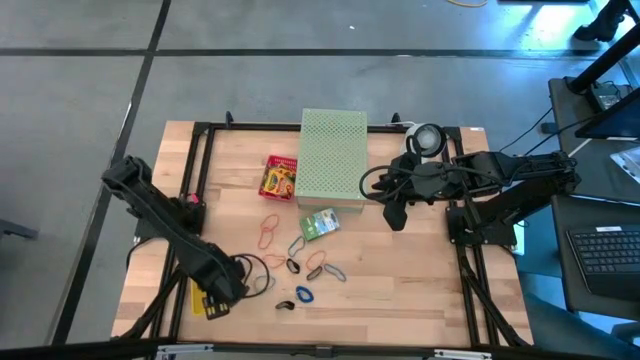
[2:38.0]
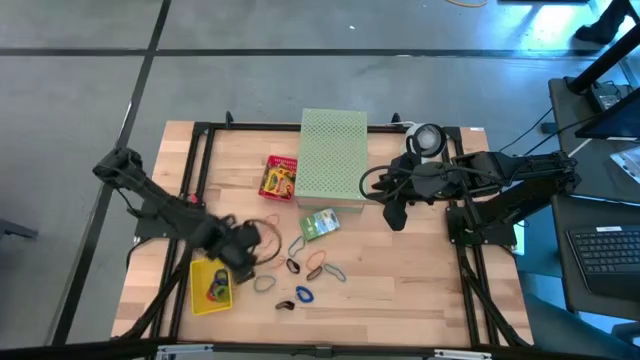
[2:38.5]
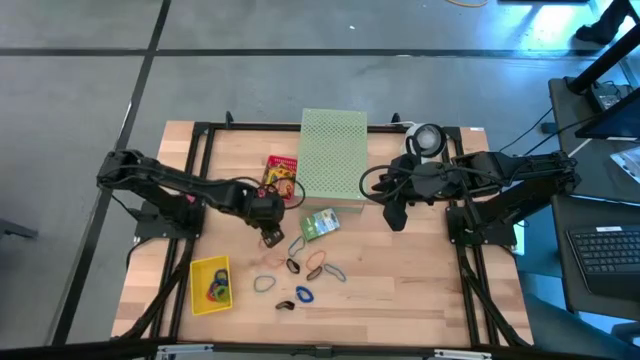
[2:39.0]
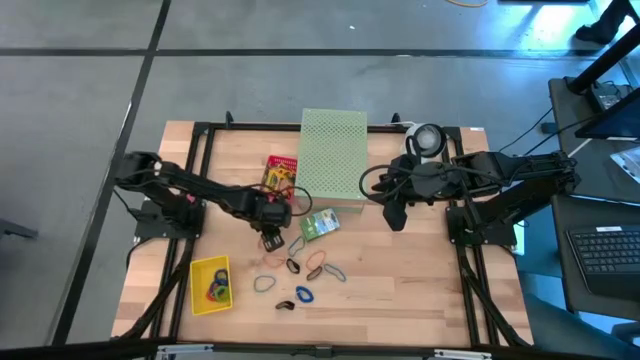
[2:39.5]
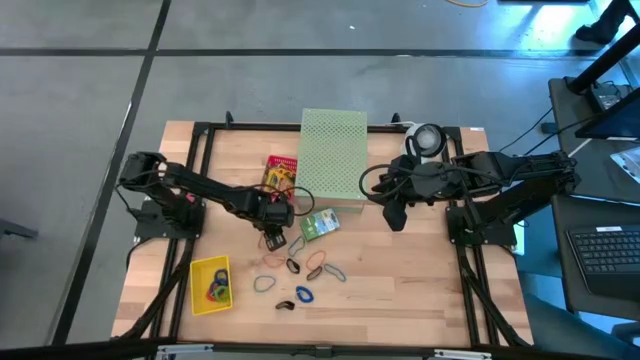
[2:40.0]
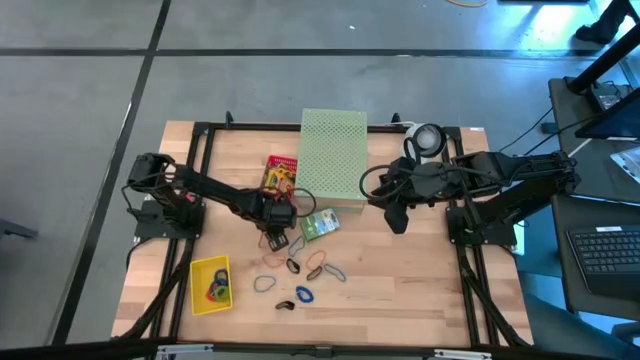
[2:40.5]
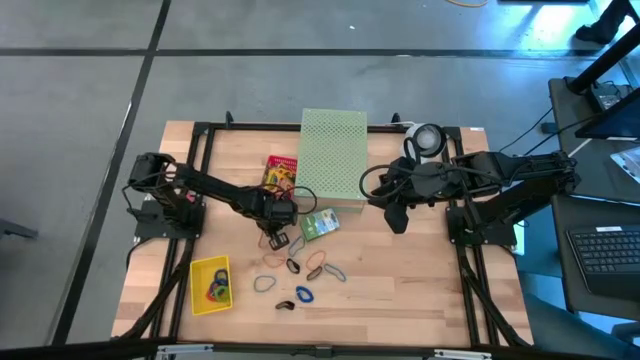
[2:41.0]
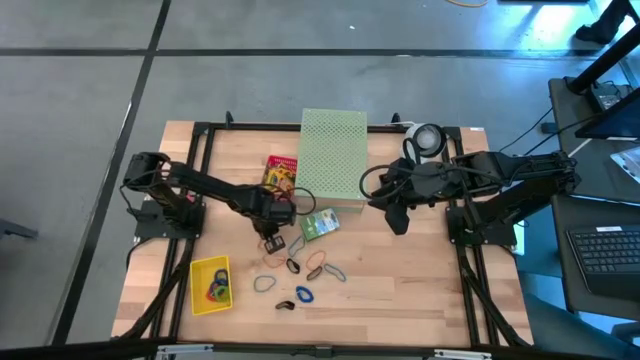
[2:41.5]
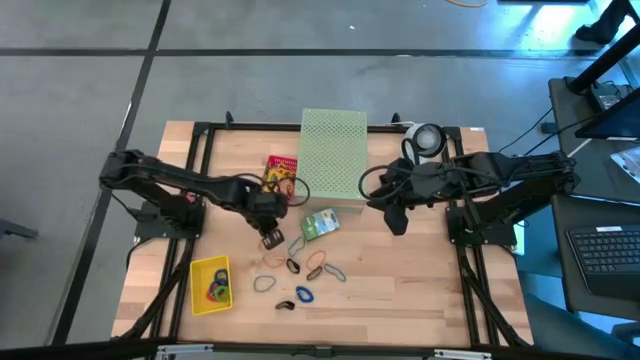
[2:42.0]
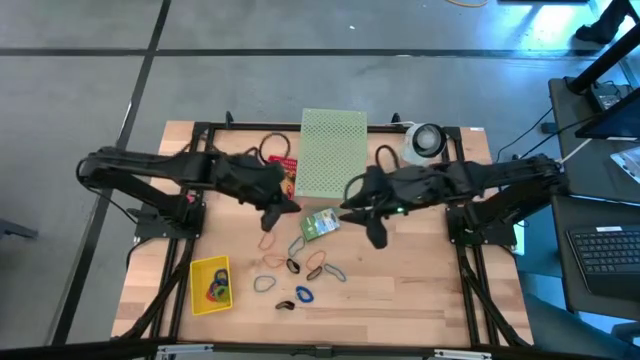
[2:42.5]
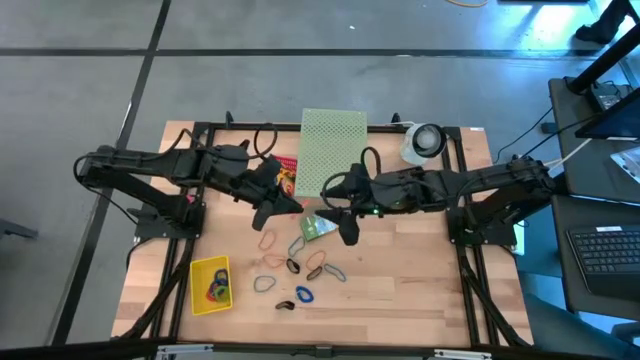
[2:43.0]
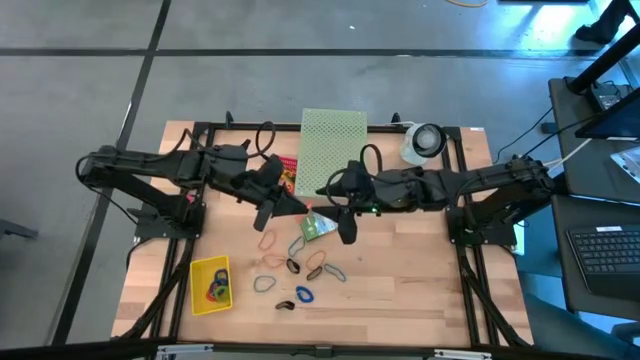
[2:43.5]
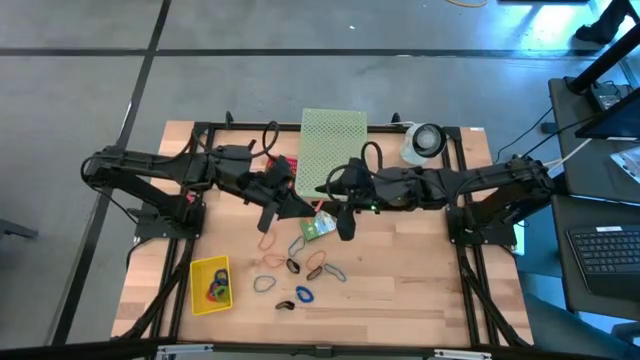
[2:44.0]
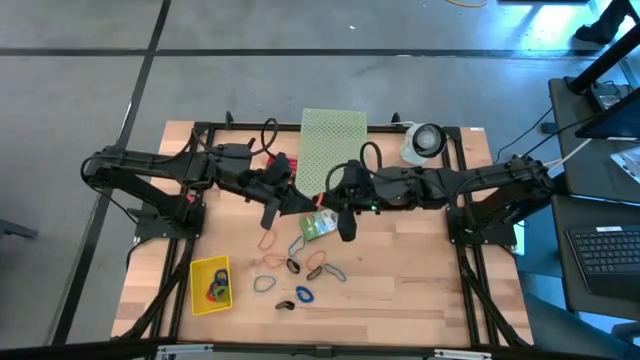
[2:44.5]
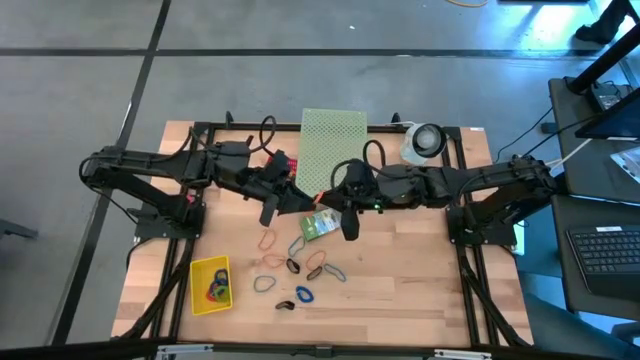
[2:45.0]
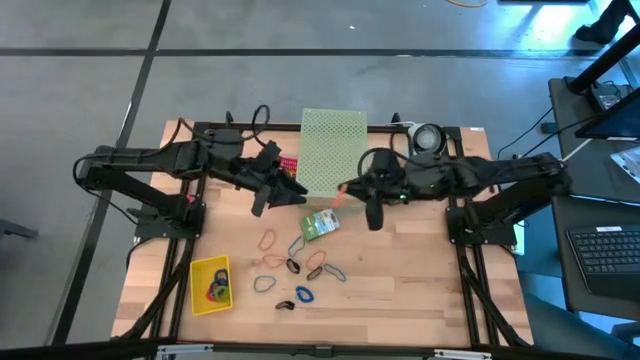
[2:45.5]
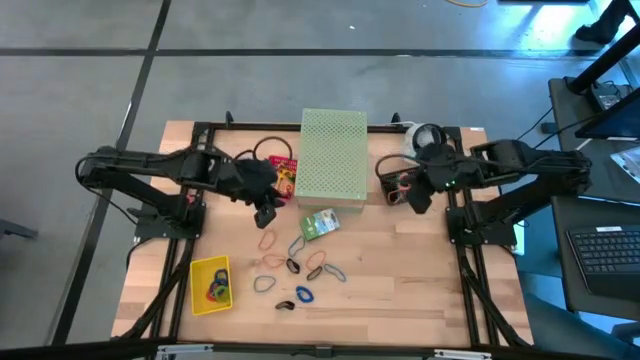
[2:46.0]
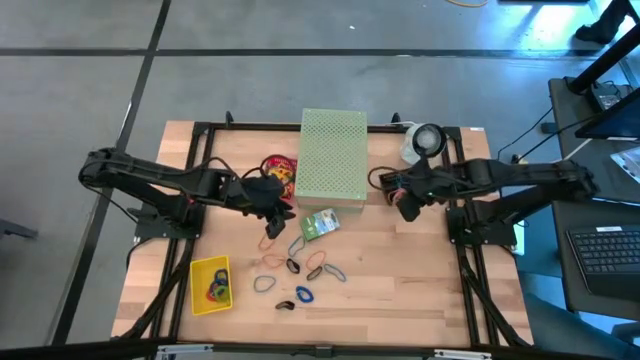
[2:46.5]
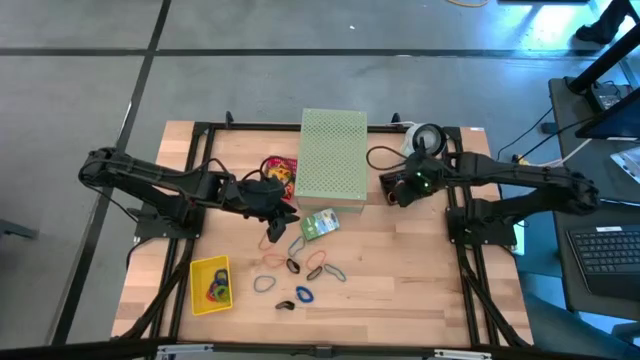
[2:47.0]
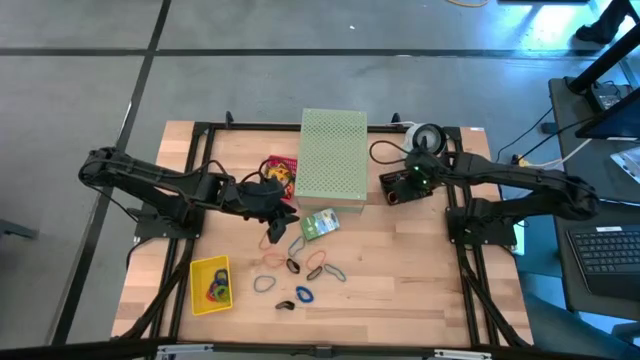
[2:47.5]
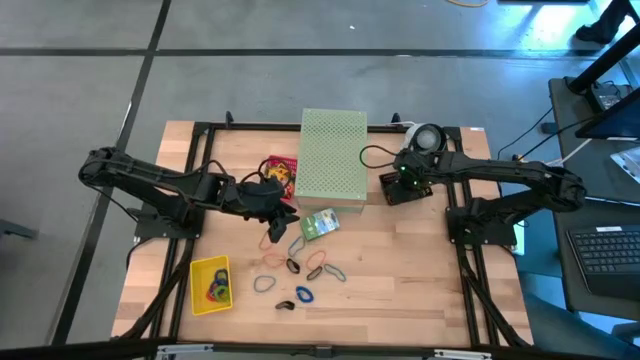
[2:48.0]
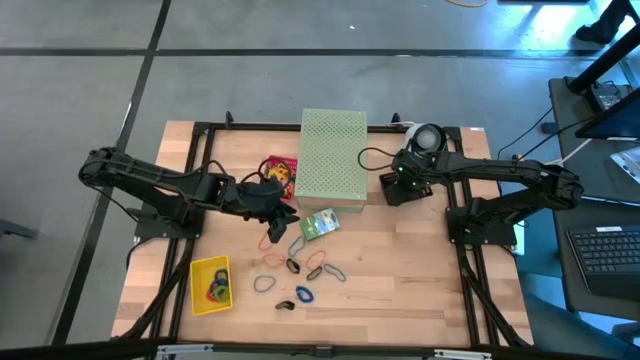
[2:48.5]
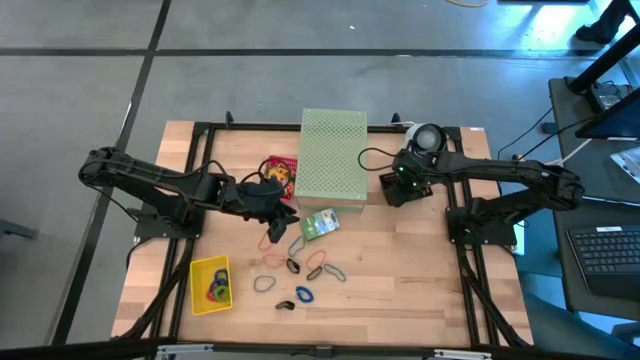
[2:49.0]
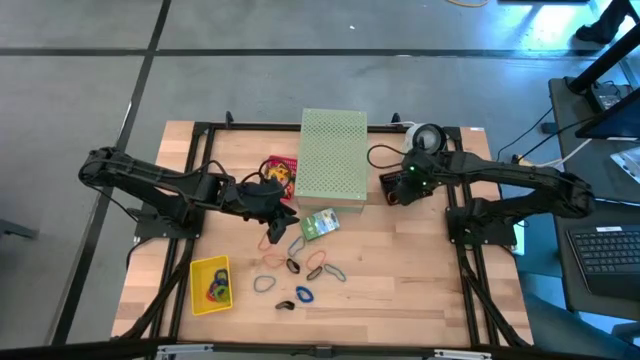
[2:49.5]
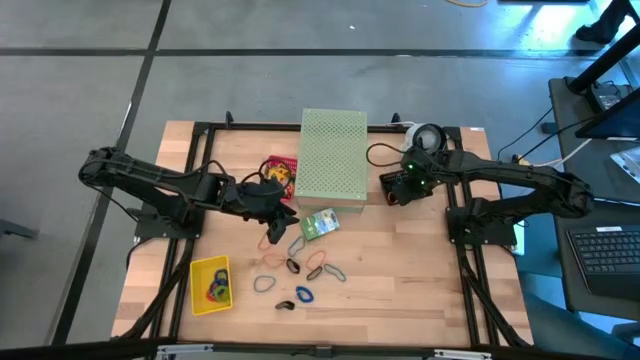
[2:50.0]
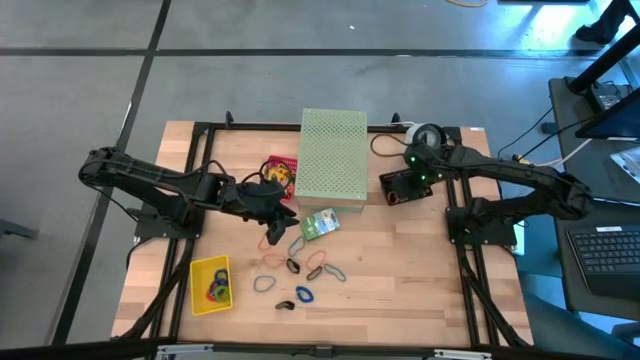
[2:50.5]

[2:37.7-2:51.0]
Task: Pick & Place Office Desk Supplies
Put the orange rubber band into the black bin

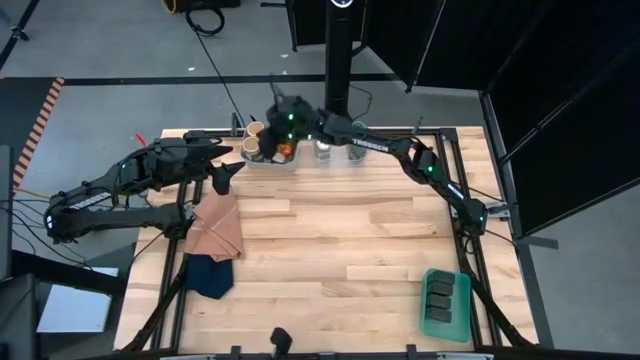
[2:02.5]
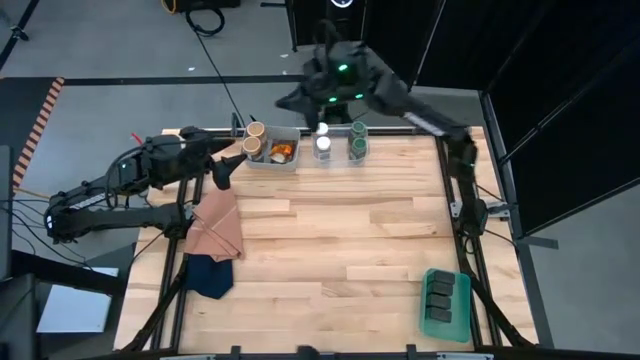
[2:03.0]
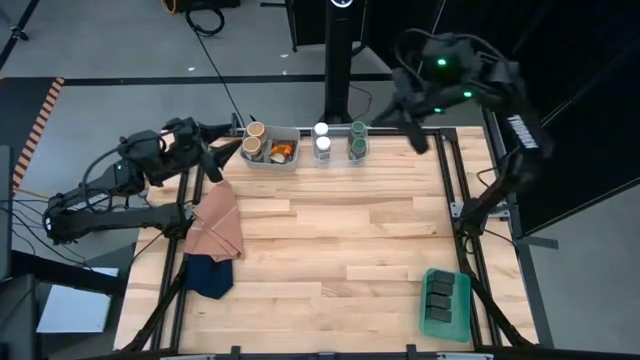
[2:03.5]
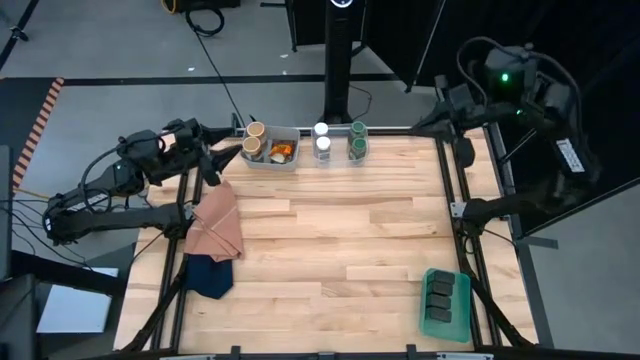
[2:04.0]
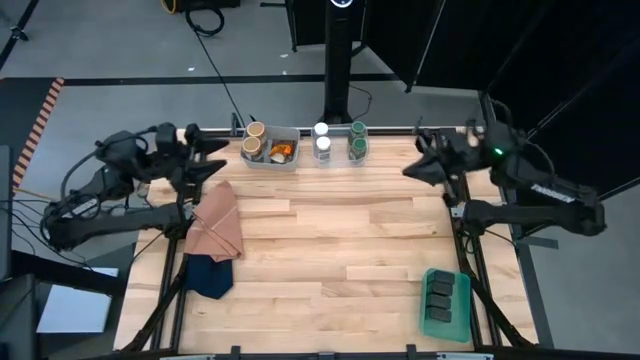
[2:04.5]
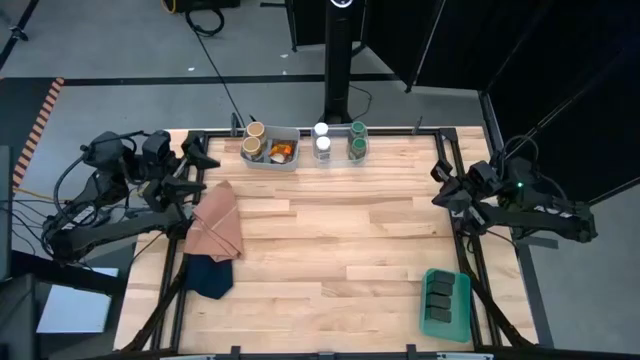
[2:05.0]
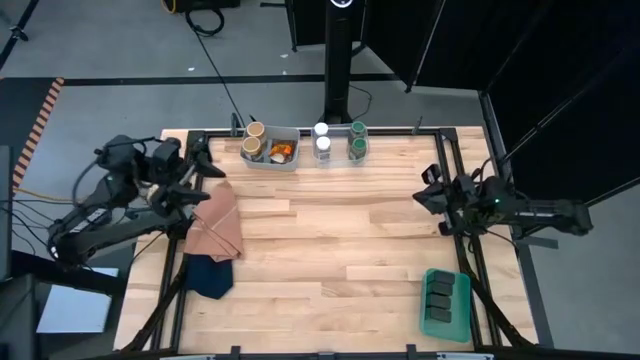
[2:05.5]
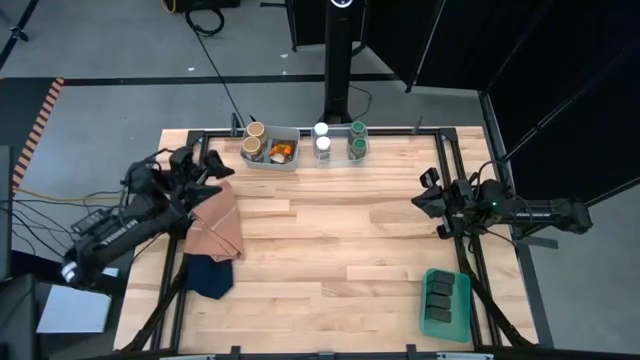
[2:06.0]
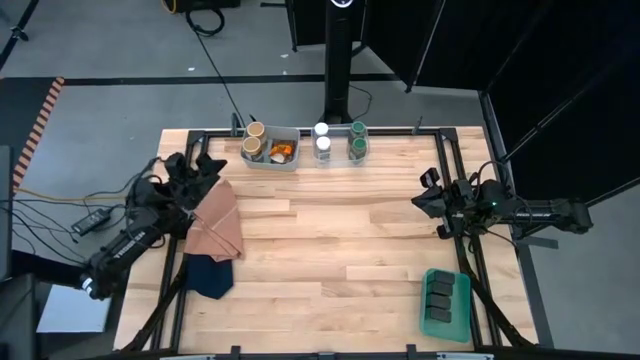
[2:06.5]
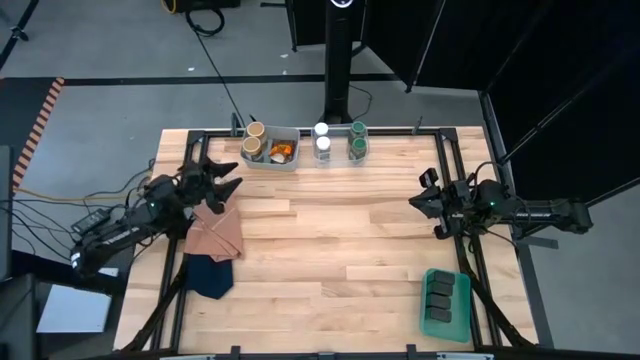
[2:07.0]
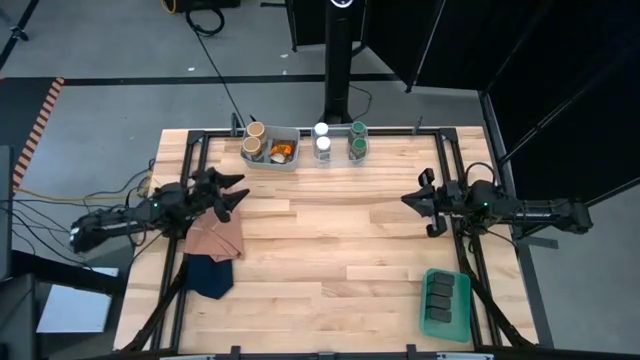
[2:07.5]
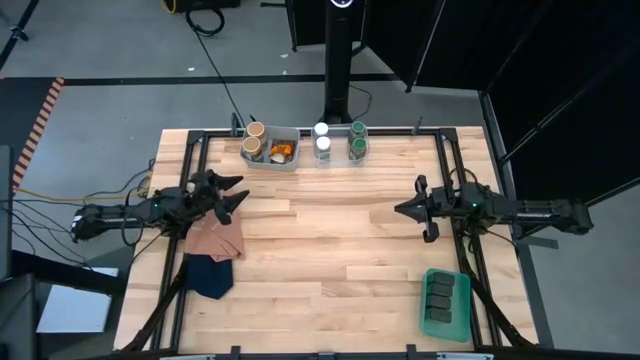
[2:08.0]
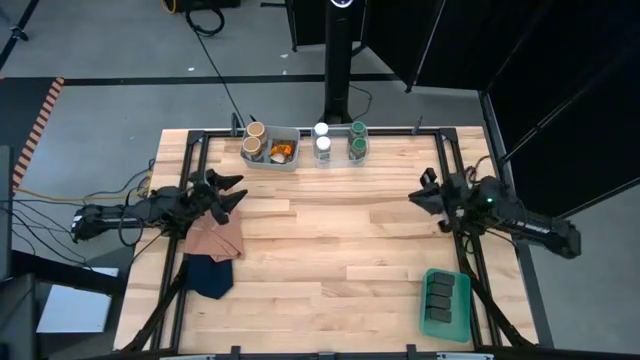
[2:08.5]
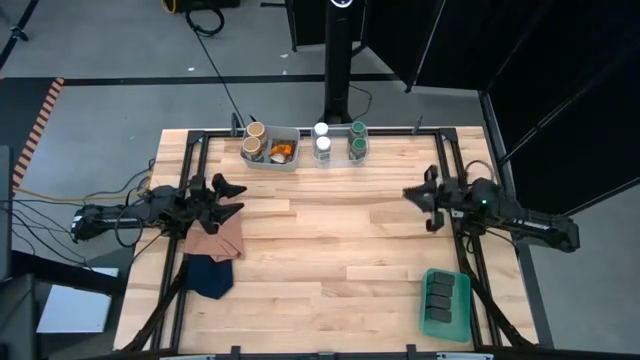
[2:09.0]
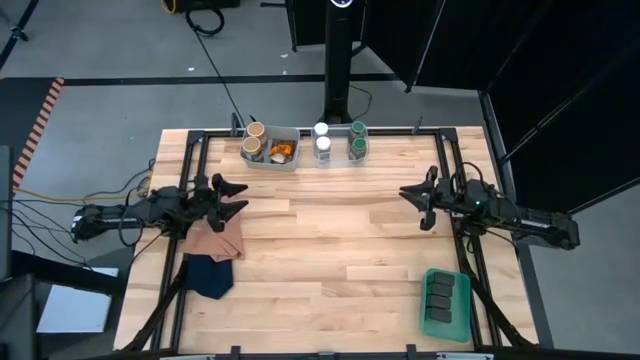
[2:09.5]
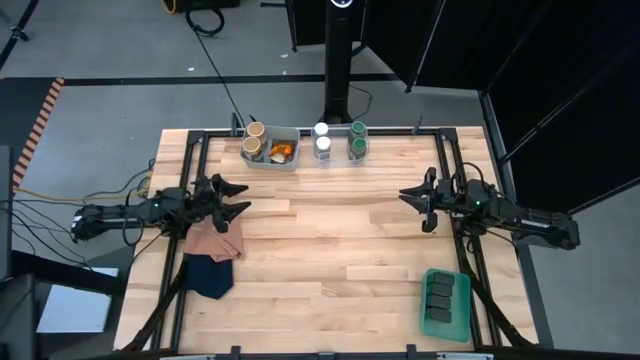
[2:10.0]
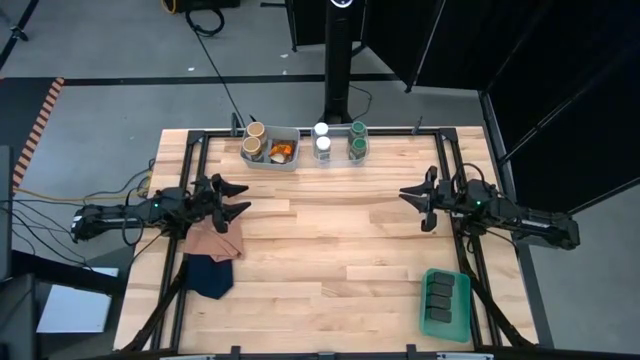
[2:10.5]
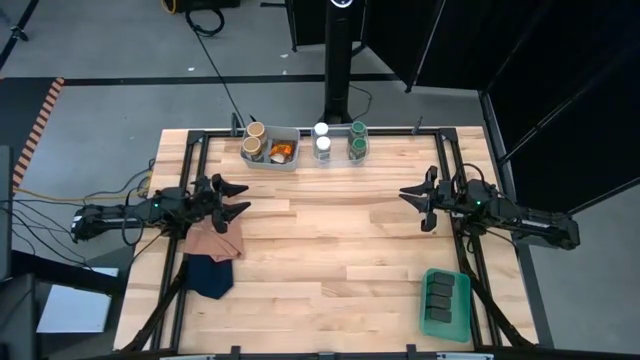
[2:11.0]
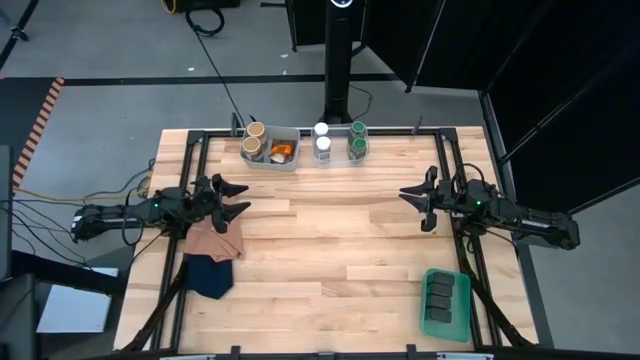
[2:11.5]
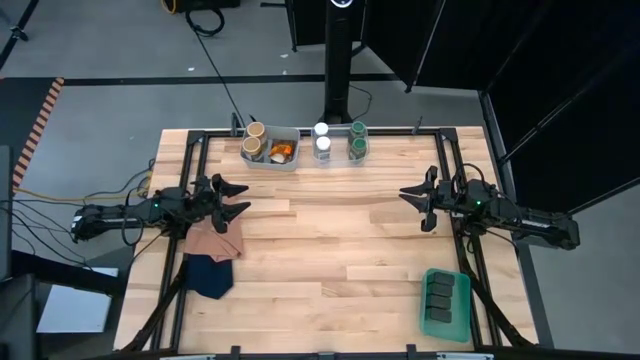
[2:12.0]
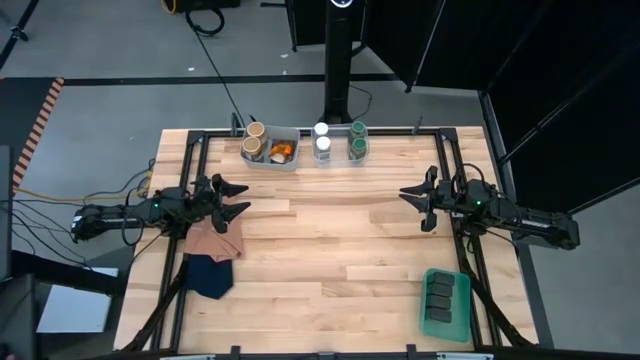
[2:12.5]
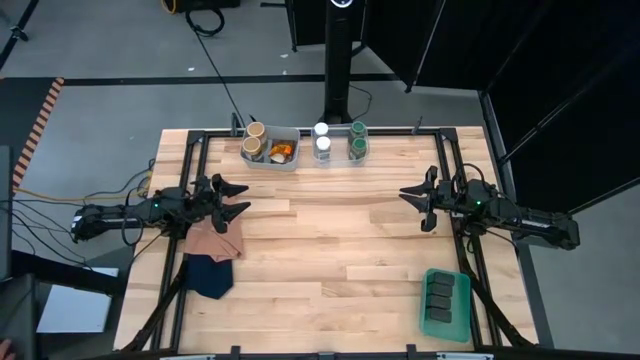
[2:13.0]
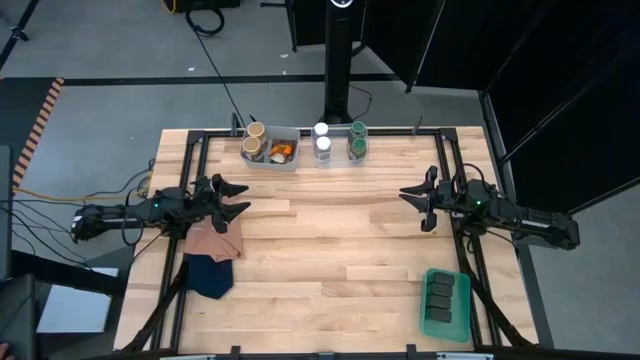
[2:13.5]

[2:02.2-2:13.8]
Task: Sort spices by type
Return to Home Position
